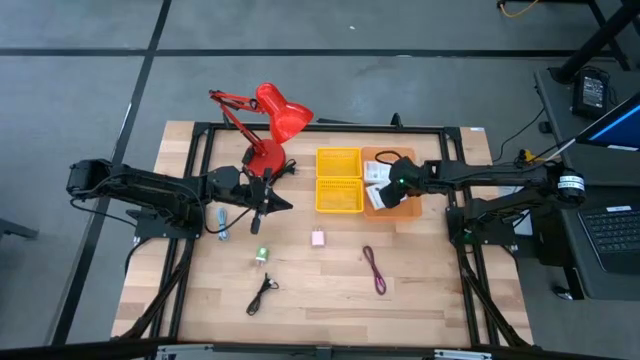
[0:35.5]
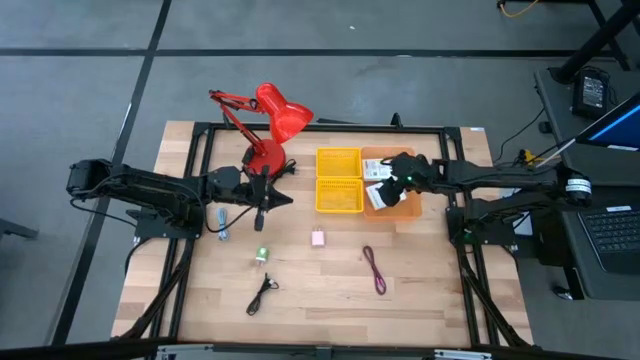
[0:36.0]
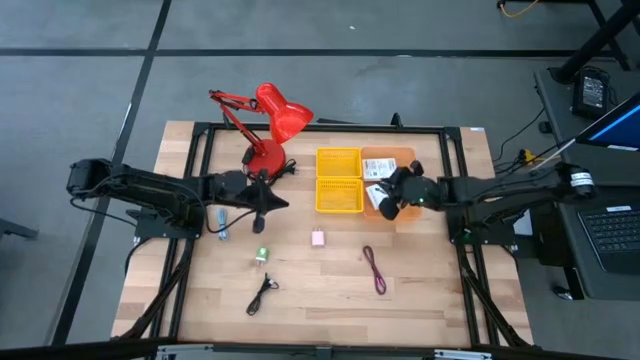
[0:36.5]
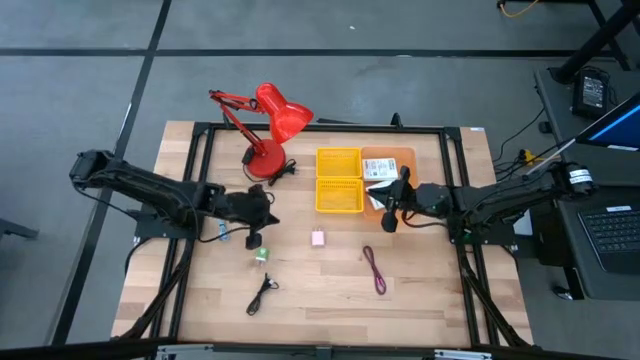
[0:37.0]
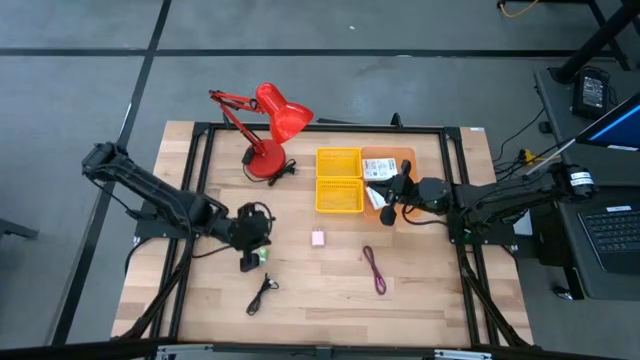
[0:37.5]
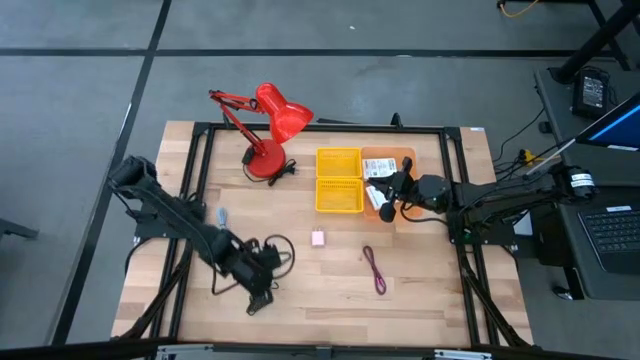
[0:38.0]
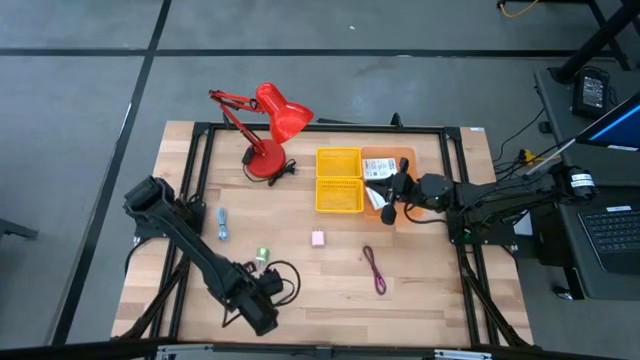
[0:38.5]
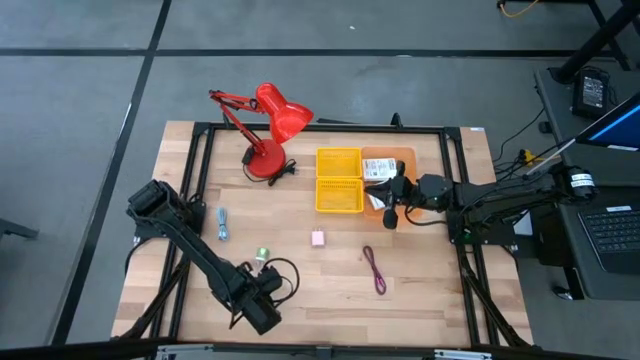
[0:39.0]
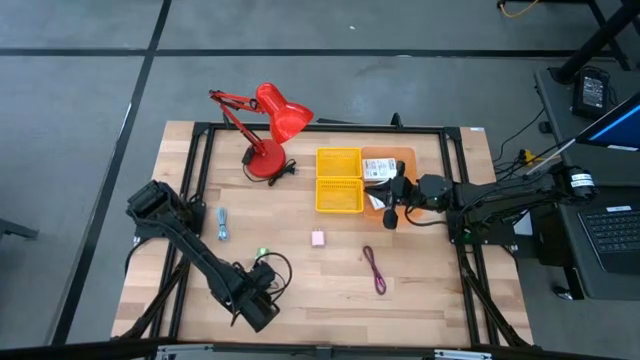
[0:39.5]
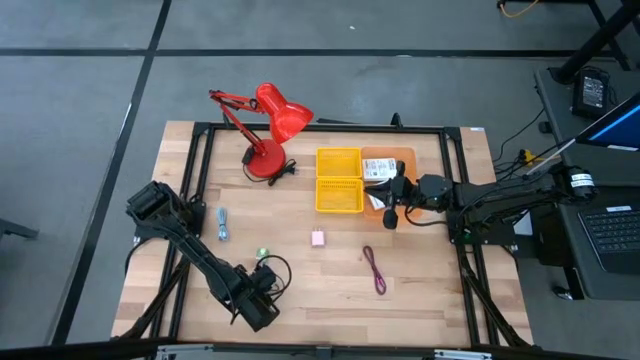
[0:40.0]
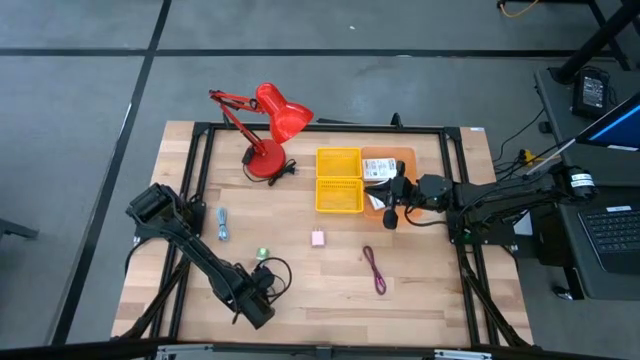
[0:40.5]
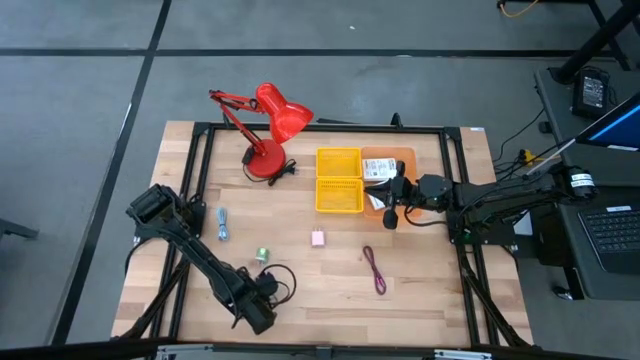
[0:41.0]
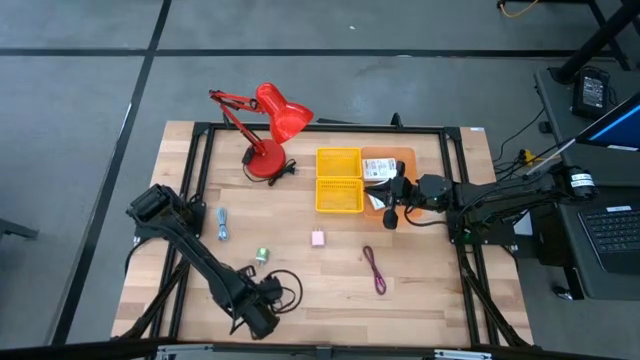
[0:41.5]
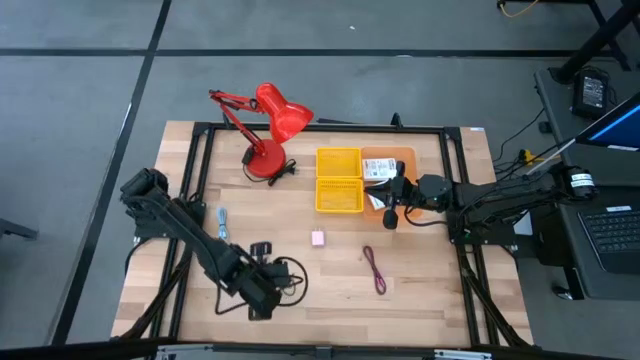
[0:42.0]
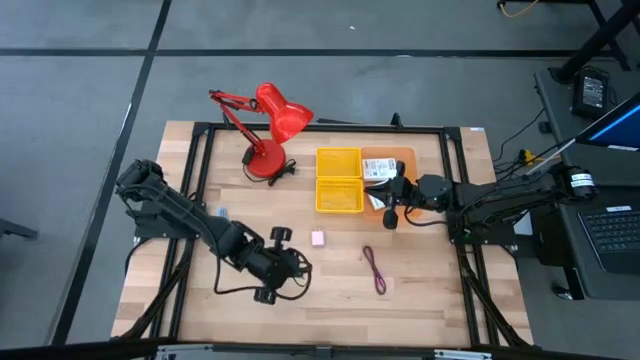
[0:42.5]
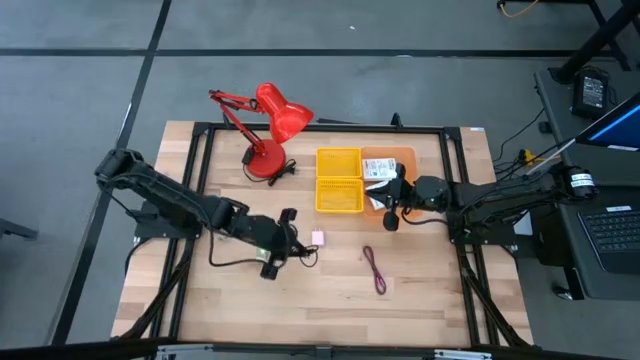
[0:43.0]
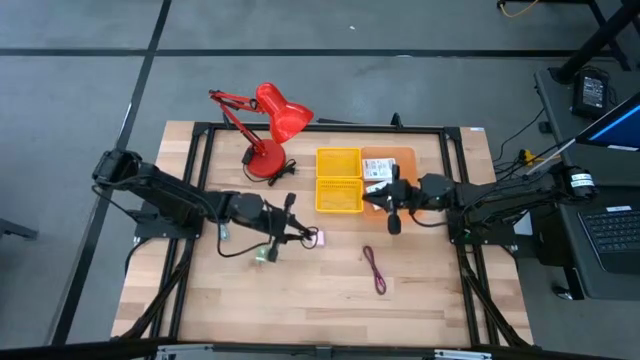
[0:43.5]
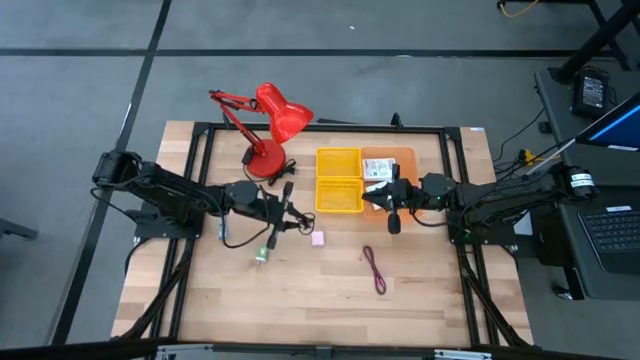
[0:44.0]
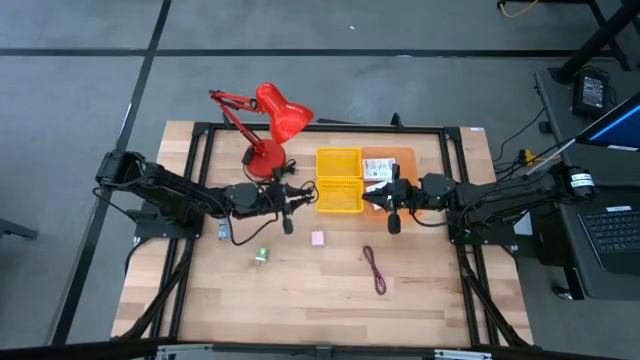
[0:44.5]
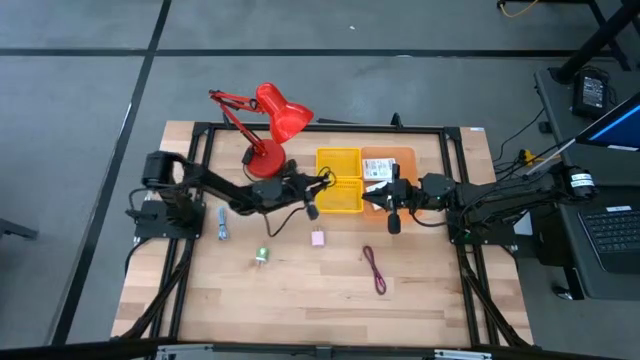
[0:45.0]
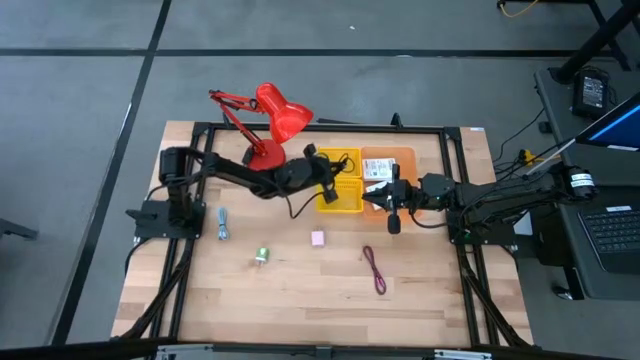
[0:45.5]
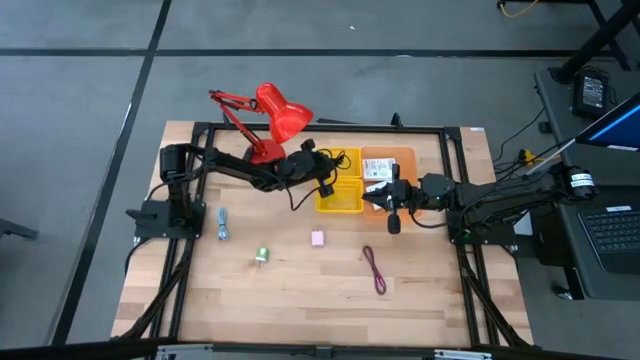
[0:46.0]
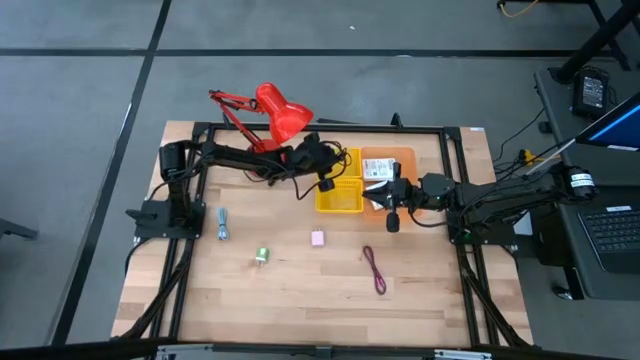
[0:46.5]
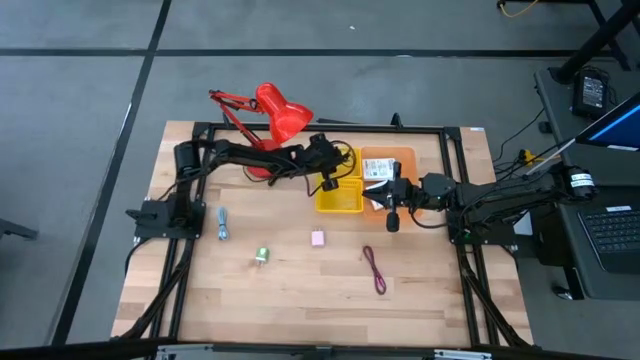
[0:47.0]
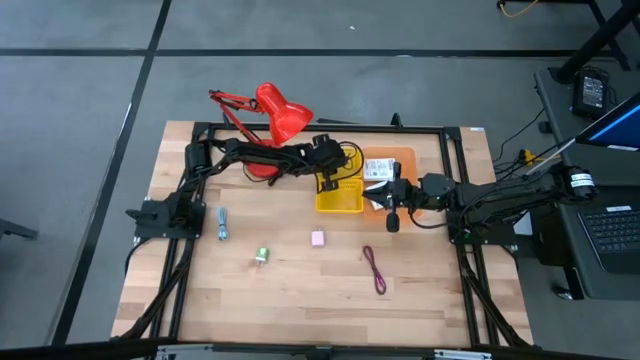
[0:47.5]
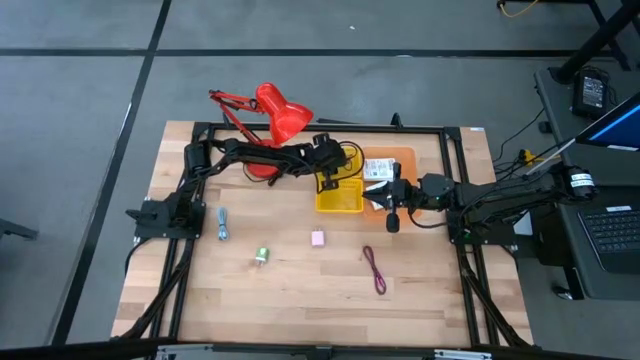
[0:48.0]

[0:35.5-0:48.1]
Task: Pick and place items into bin
Put the black charger cable into the top yellow bin

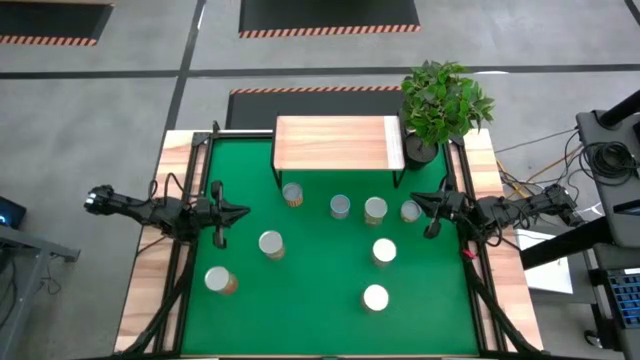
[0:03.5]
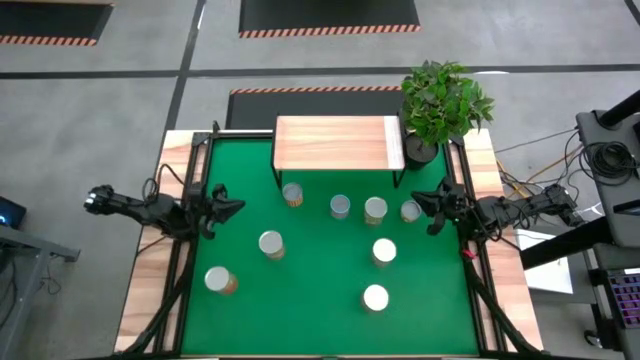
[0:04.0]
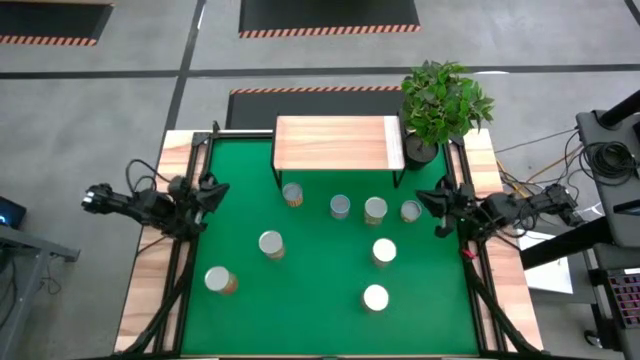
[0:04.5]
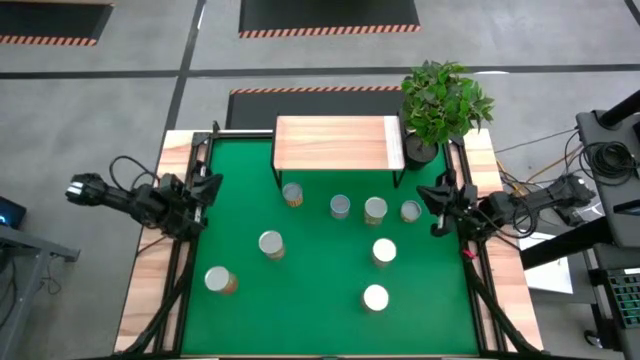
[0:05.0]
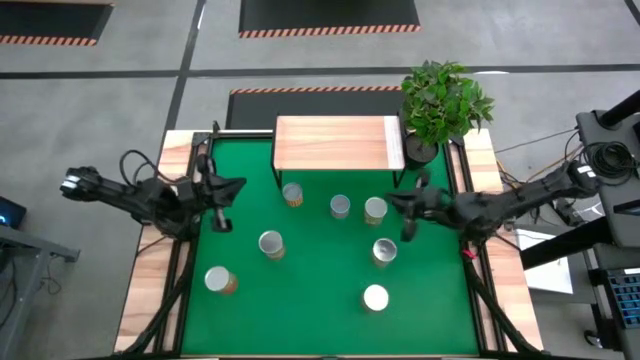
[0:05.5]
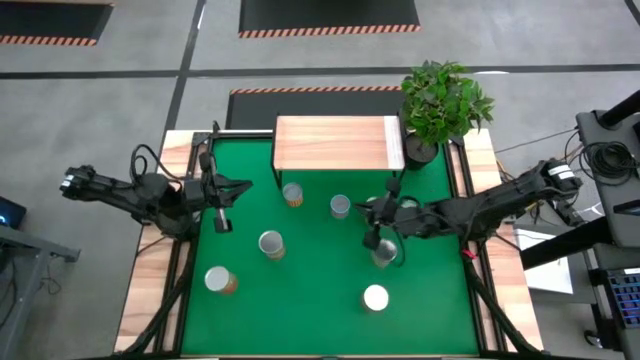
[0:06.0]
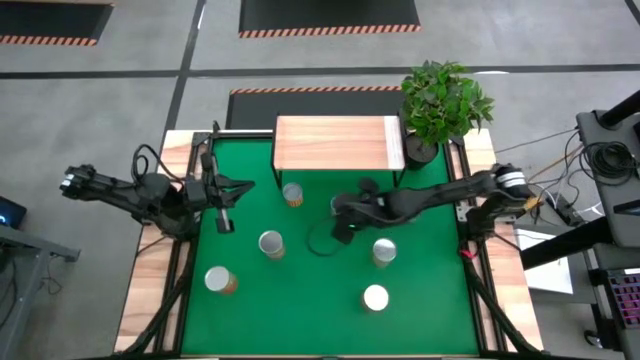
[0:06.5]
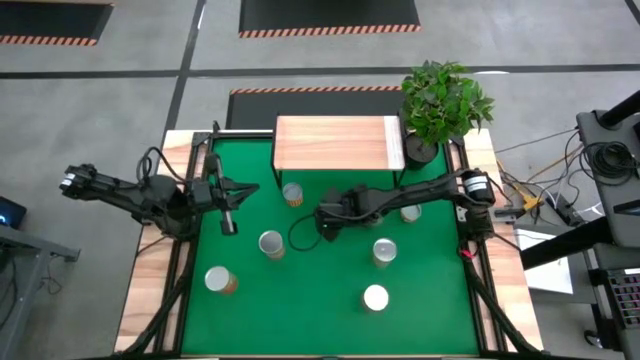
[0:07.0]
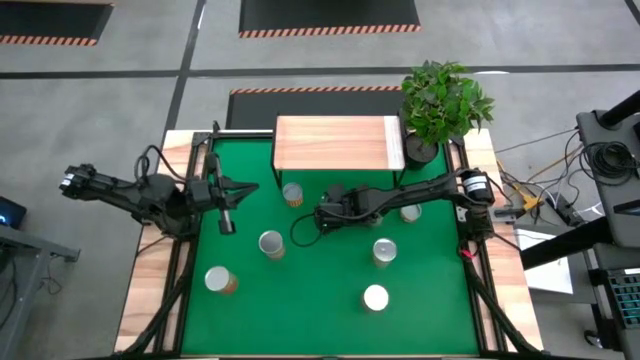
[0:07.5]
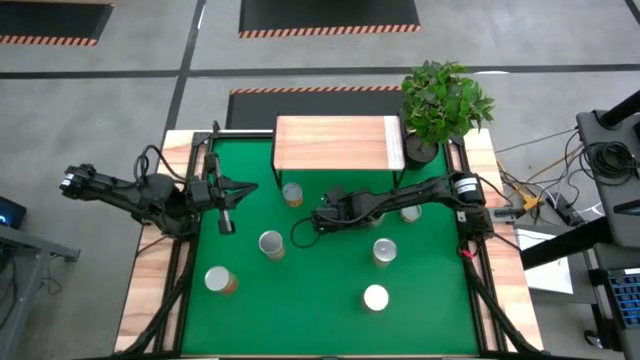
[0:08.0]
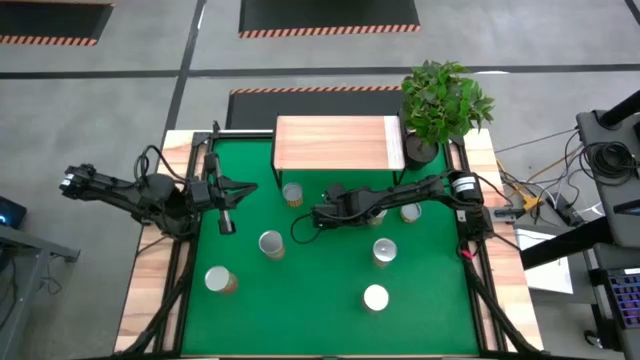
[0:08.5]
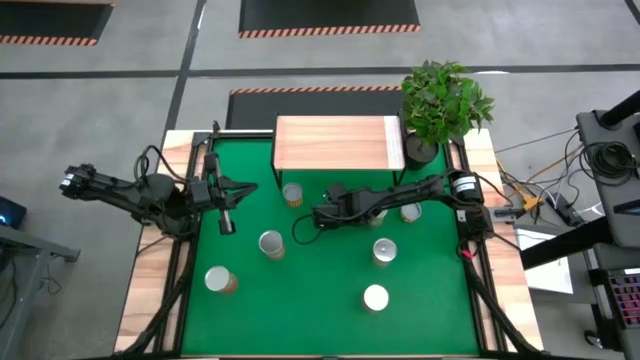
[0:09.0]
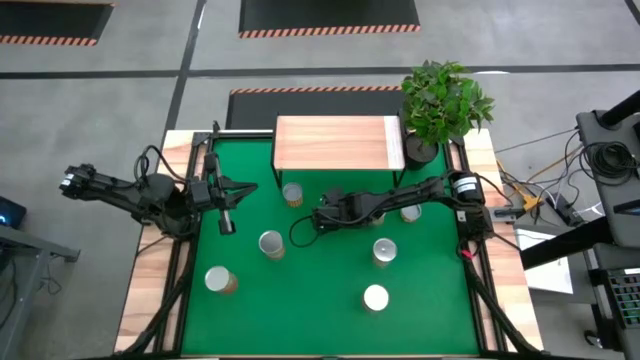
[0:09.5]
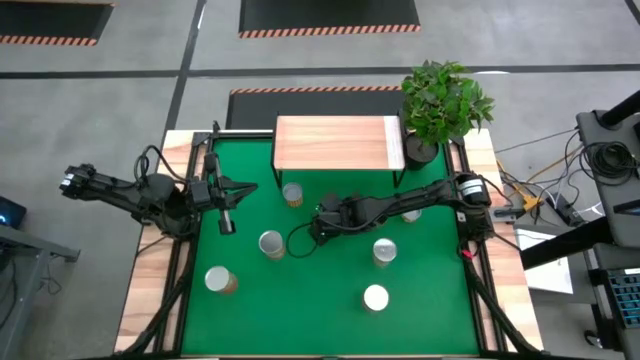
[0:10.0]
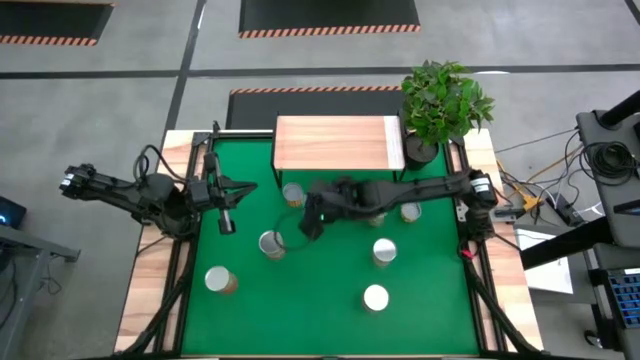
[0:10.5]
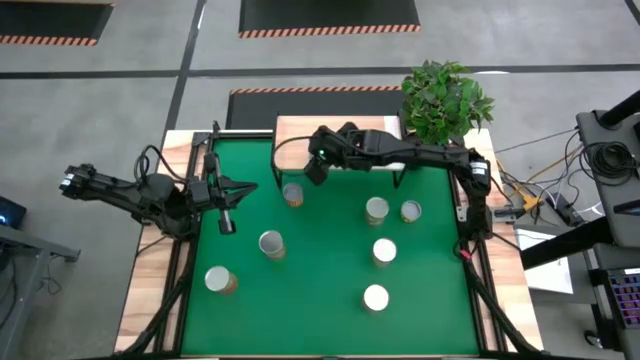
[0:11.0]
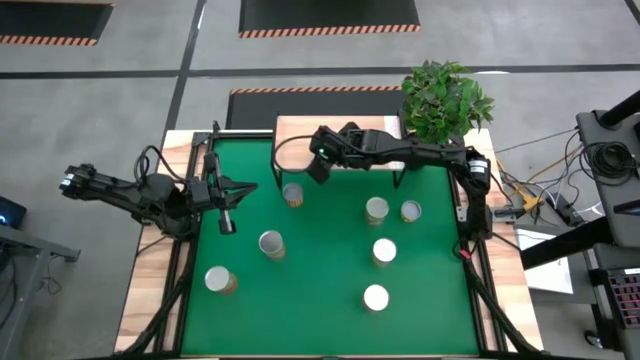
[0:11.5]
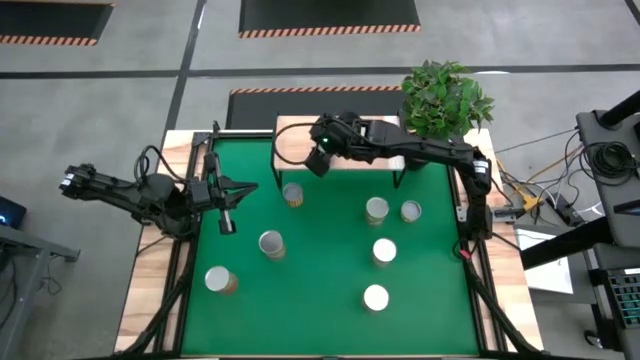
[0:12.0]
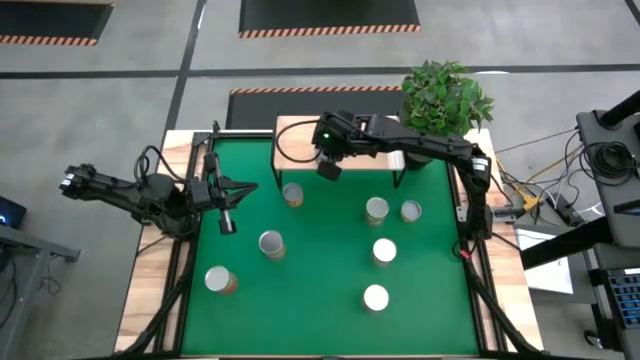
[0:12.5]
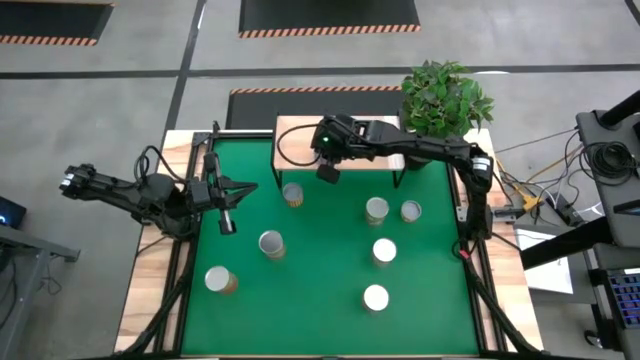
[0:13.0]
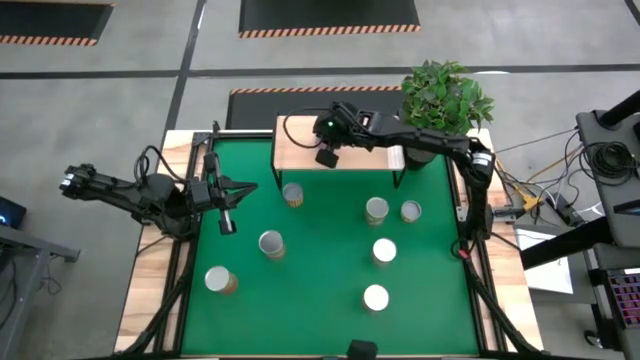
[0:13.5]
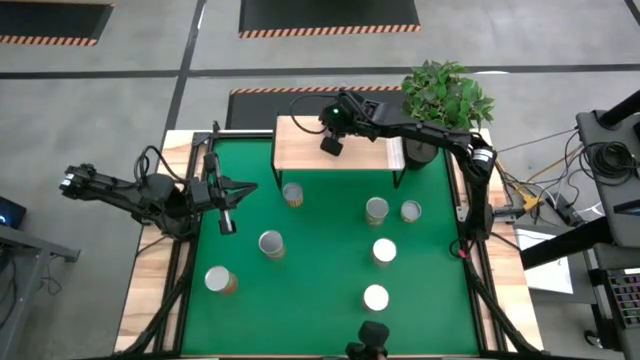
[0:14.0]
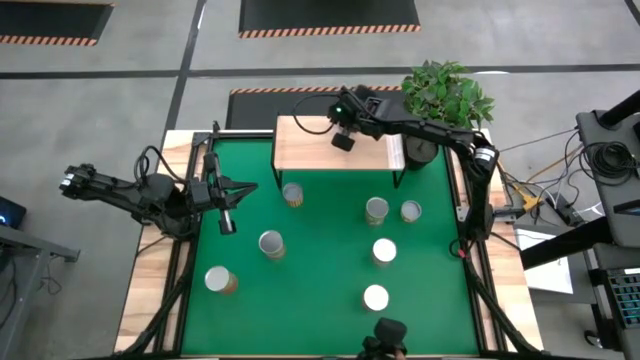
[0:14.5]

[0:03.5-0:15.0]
Task: Pick and place cans onto a shelf
Put the small canned corn on the shelf
